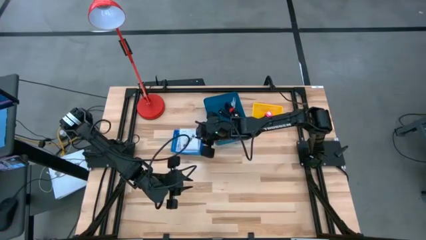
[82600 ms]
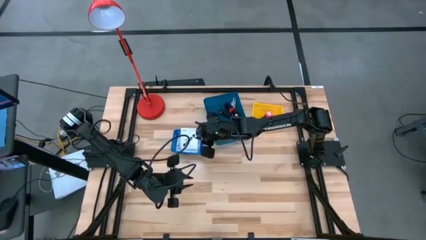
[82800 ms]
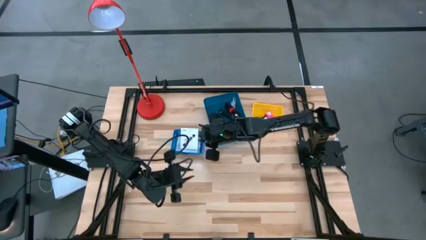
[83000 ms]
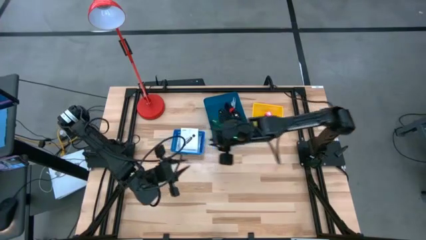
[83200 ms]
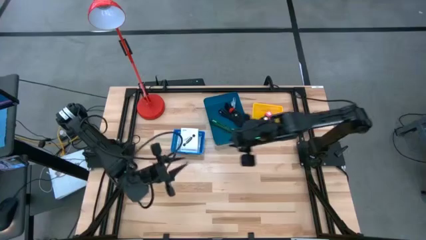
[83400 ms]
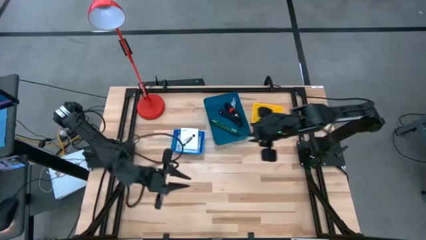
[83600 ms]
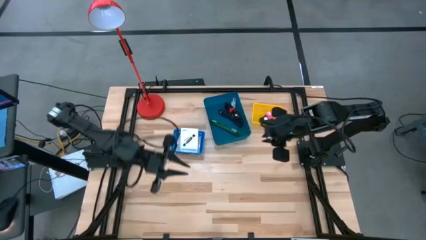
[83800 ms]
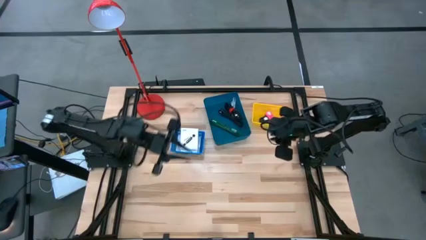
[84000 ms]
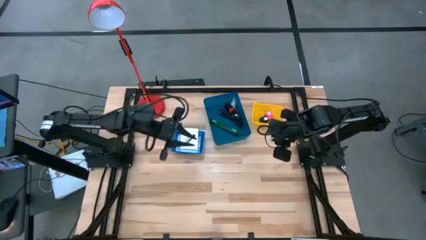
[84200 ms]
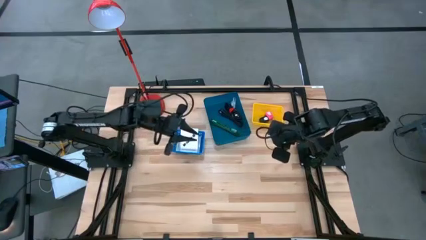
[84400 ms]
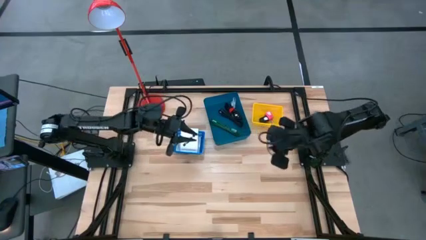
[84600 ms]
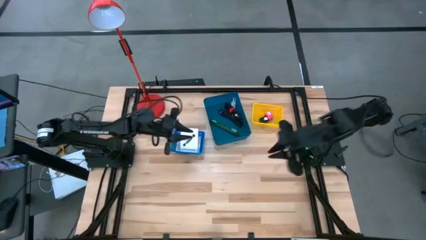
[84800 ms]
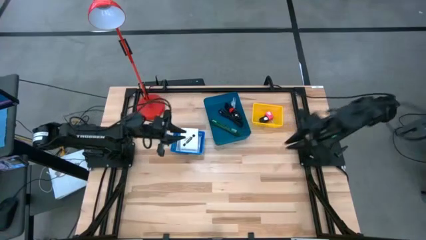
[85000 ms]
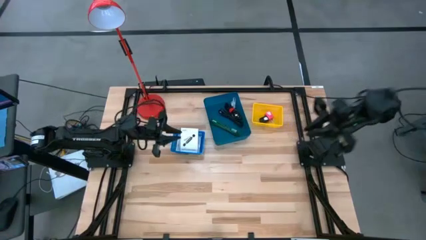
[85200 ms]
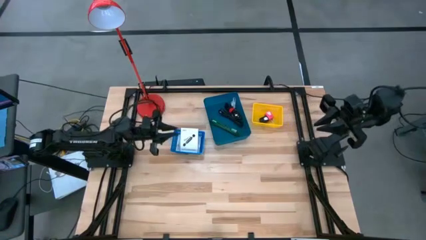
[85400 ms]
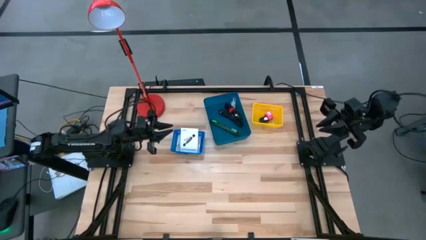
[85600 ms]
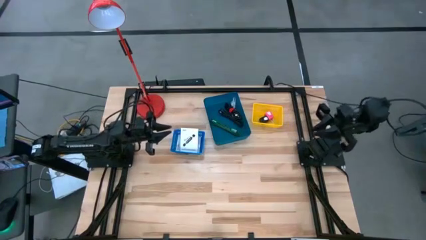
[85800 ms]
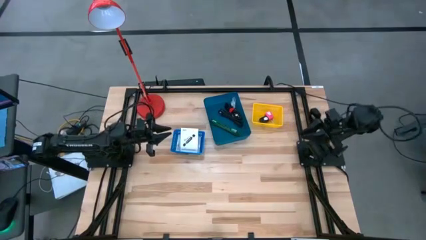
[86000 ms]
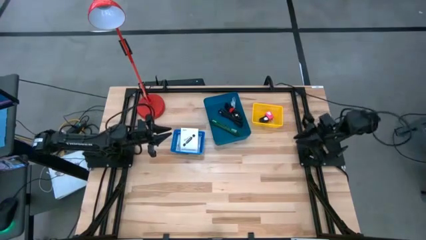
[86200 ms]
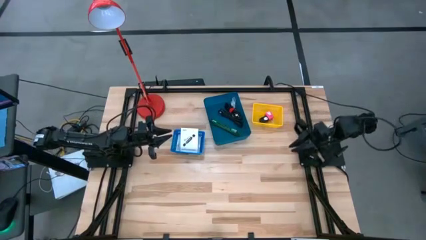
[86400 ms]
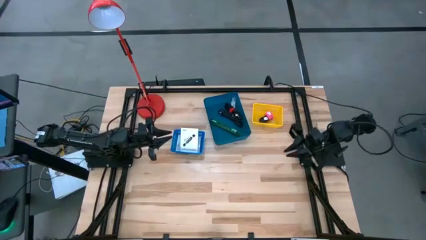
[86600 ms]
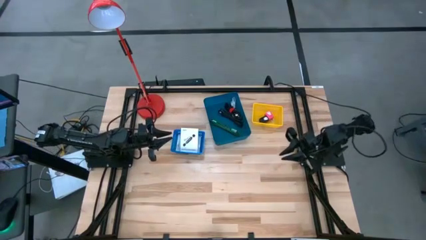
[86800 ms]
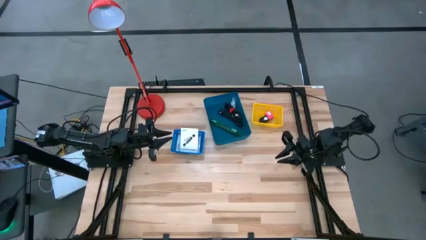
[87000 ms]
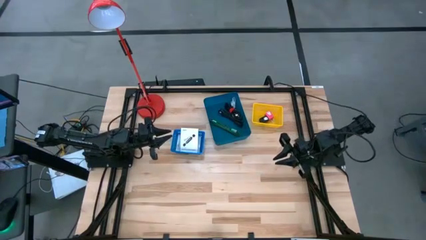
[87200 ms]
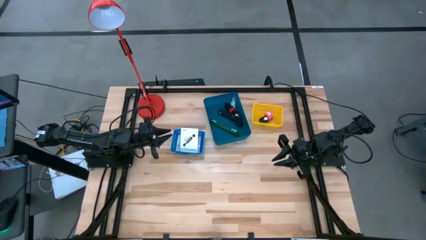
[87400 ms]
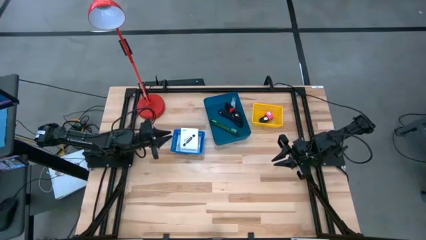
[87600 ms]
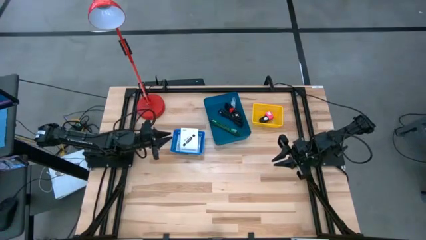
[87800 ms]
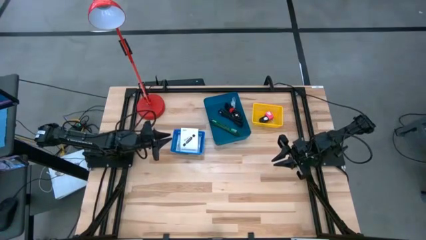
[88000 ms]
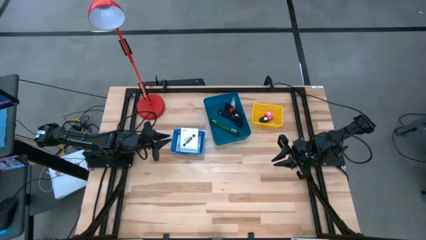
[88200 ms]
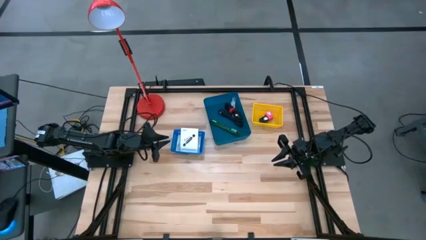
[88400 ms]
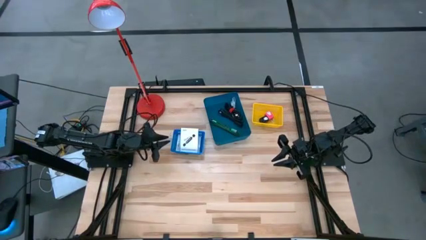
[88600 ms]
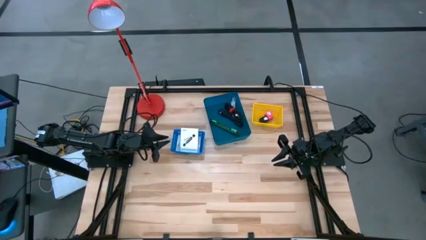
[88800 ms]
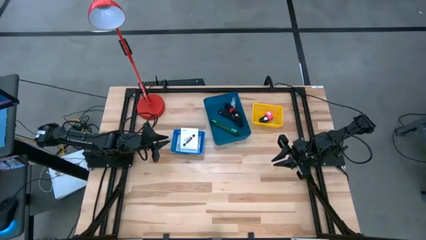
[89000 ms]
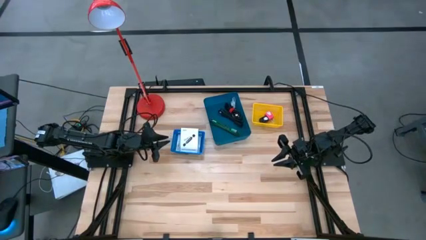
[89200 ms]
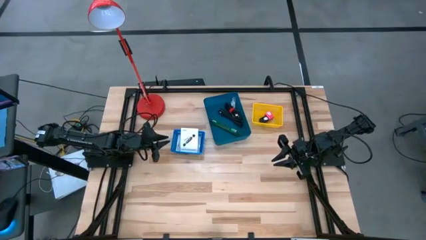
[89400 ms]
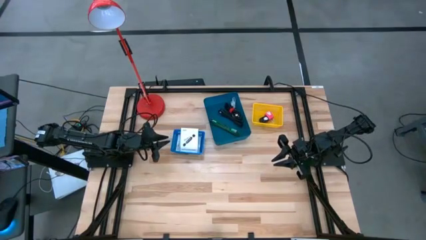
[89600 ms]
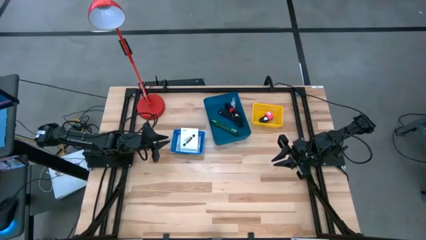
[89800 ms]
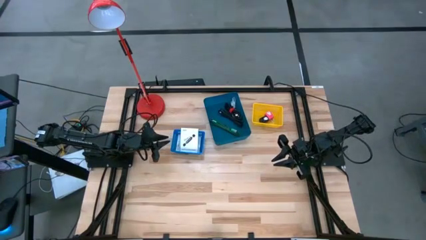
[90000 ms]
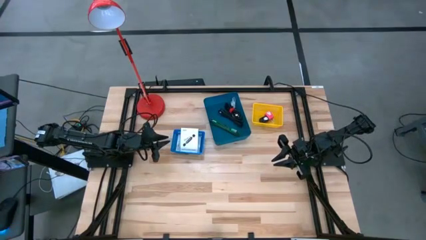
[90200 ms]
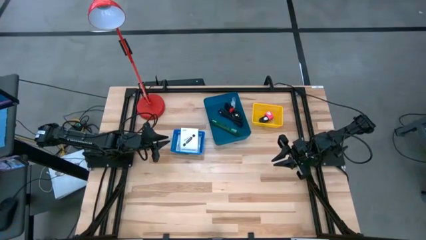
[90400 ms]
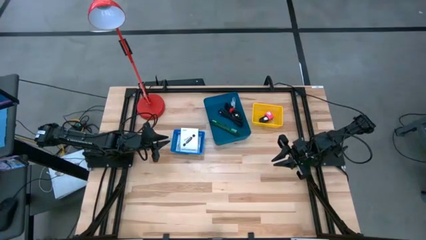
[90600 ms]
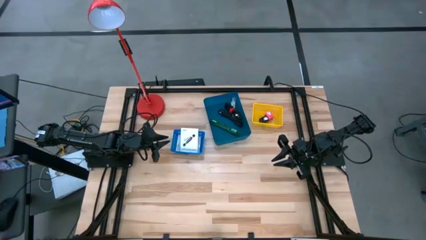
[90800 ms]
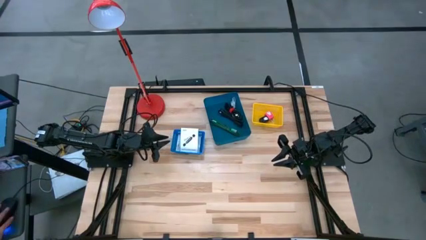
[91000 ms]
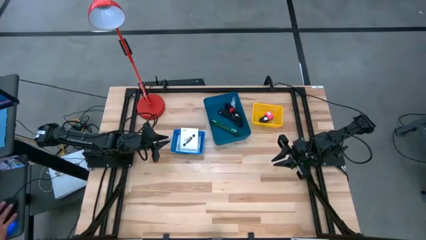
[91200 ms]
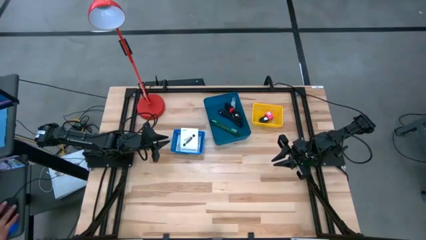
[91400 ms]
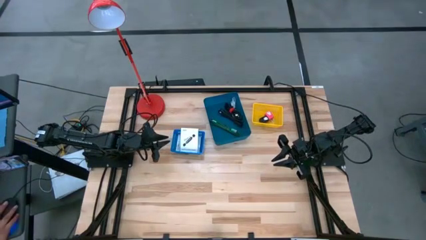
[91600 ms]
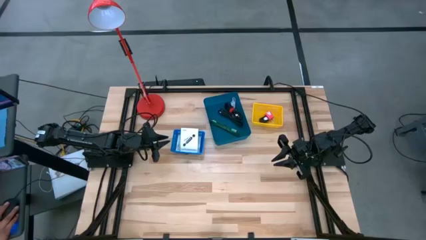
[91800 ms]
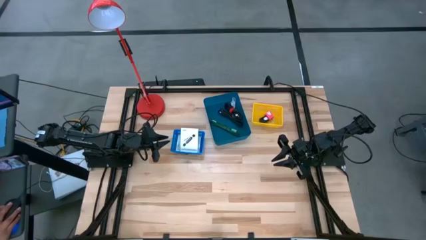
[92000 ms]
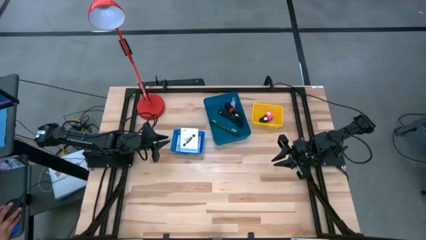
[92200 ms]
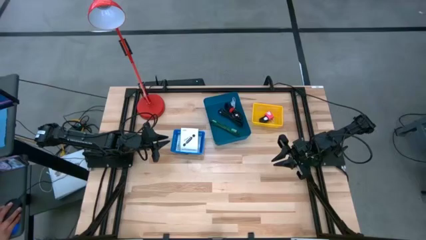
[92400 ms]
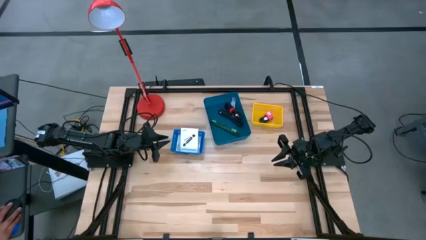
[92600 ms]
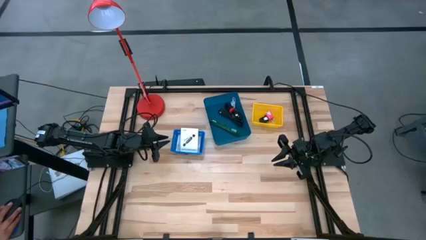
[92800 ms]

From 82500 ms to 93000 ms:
Task: Pick and place items into bin
Return to Home Position

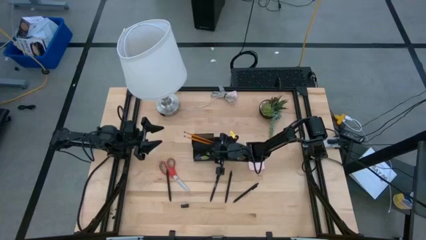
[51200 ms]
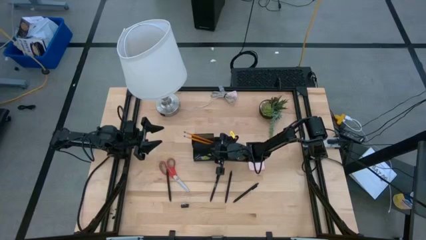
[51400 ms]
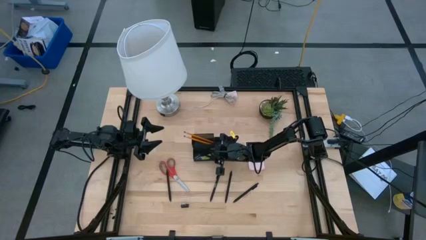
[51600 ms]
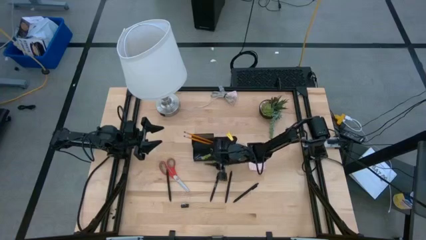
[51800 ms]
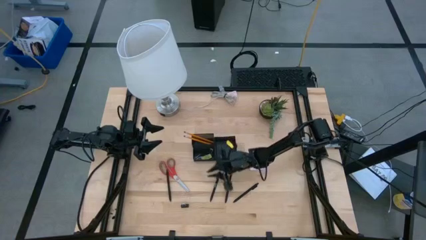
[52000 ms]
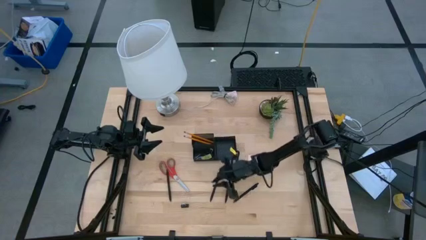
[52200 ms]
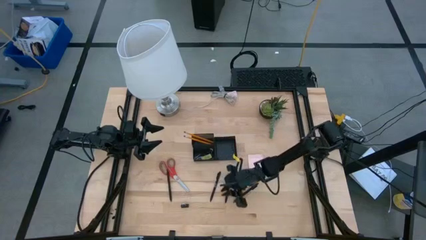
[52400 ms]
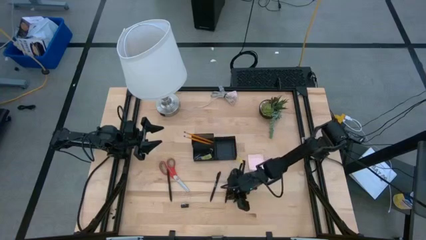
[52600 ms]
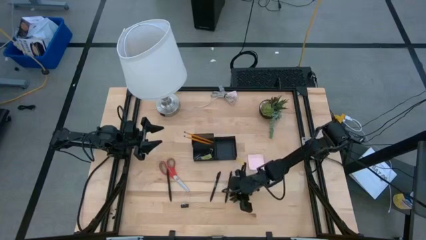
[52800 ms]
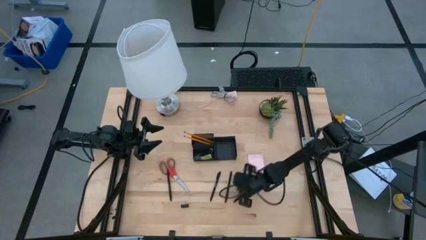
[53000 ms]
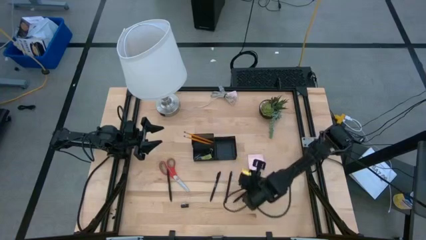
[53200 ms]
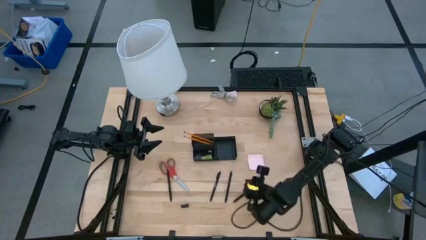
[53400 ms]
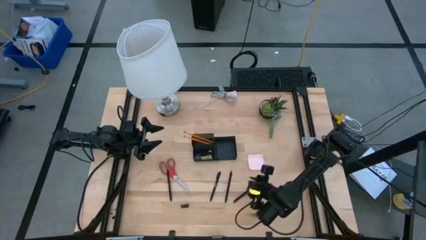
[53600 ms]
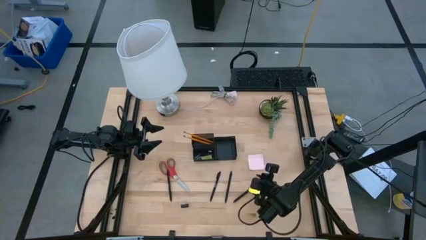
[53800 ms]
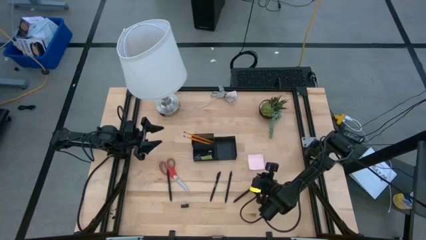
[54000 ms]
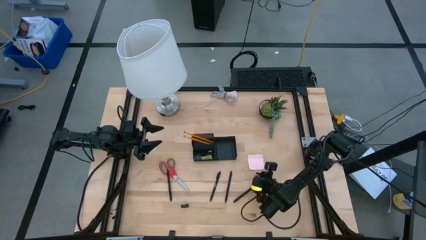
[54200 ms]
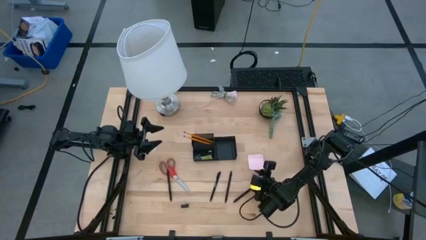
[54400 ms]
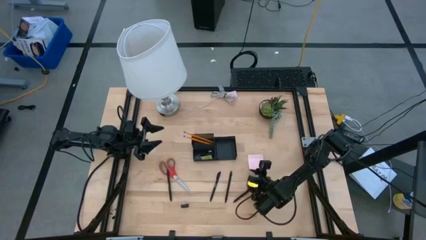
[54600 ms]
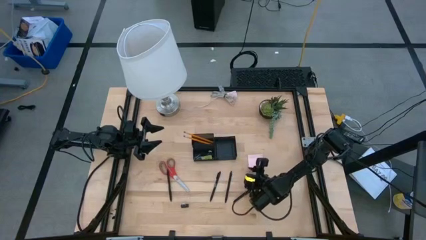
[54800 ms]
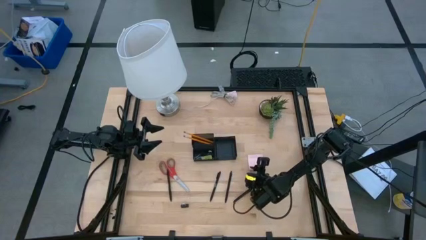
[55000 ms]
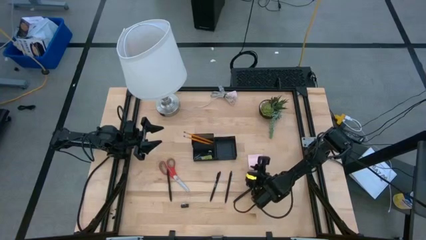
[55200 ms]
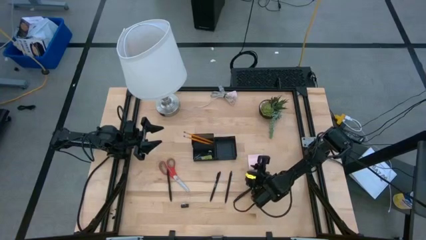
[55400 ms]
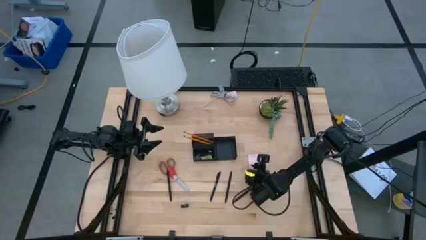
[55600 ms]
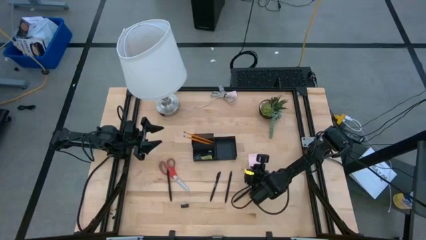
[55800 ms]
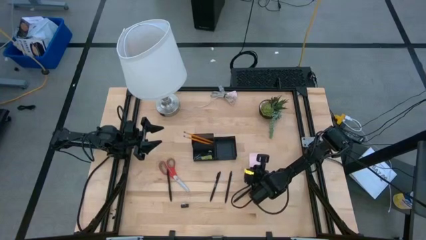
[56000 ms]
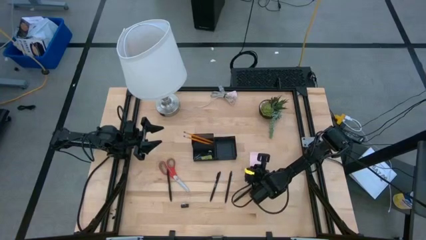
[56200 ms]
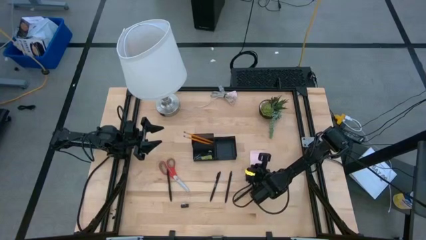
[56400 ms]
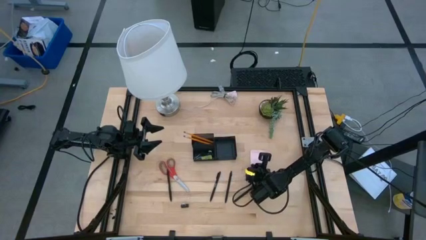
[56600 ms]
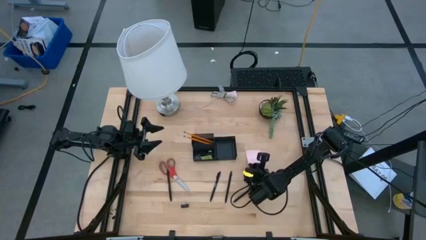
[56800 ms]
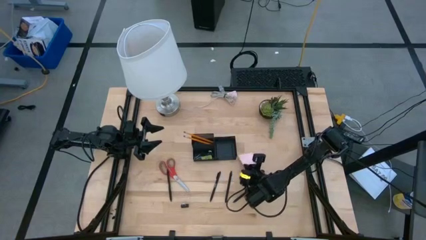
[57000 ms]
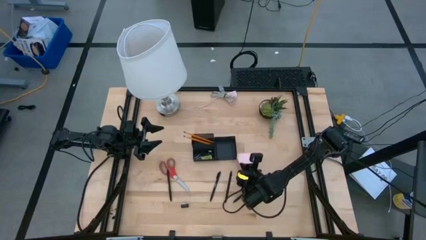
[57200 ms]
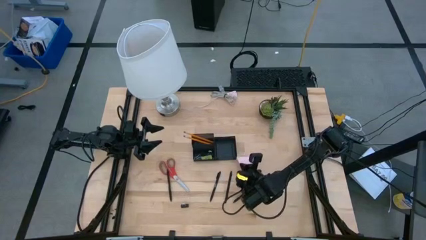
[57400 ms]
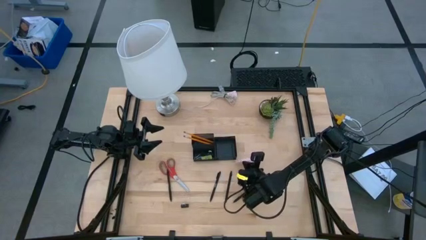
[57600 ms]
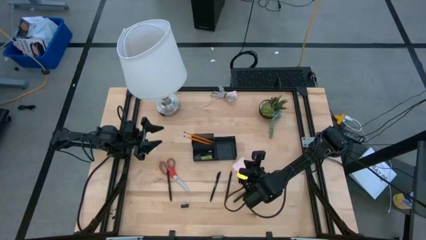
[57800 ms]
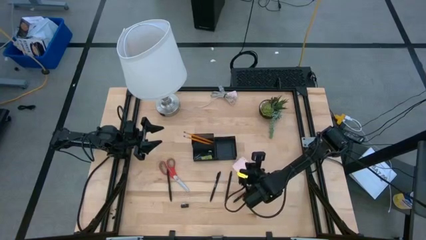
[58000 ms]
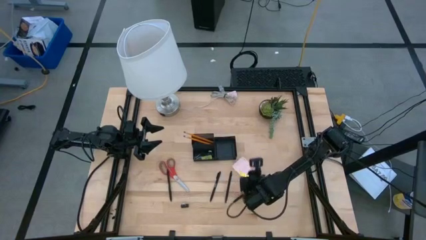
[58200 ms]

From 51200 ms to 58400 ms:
Task: Pick and place office supplies into organizer
Put the pink sticky notes into the black desk organizer
